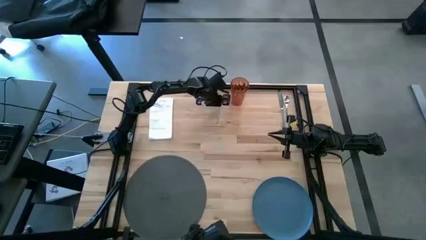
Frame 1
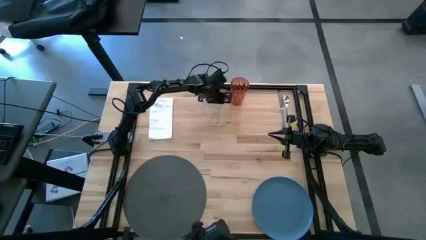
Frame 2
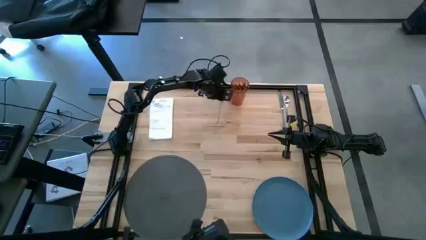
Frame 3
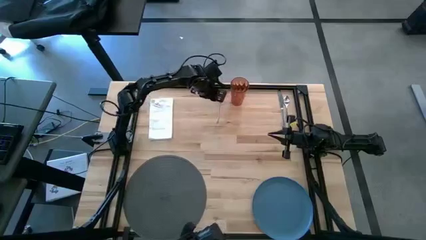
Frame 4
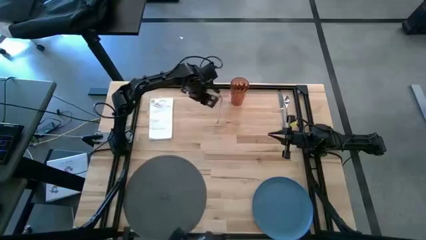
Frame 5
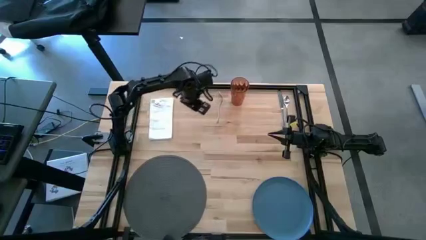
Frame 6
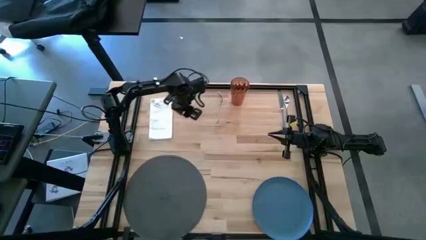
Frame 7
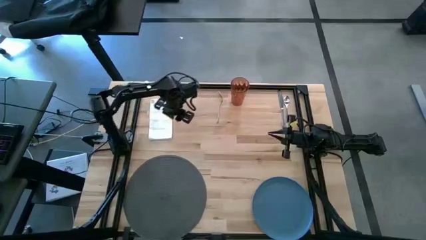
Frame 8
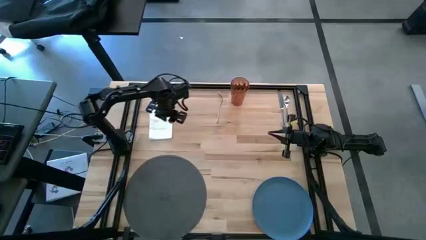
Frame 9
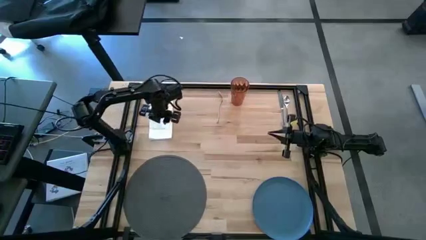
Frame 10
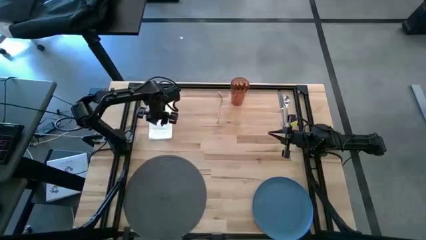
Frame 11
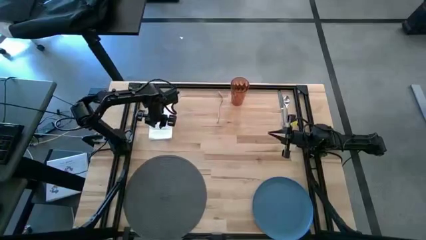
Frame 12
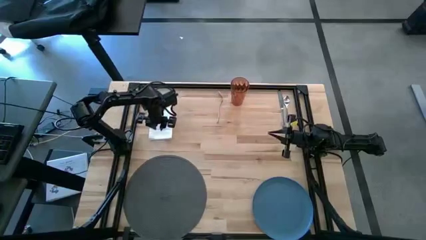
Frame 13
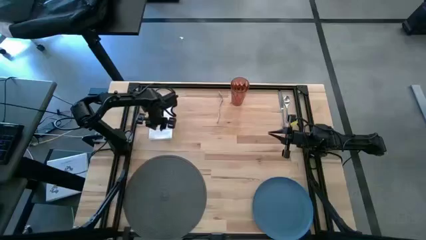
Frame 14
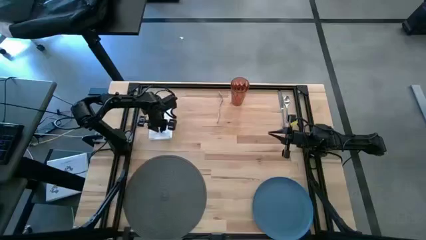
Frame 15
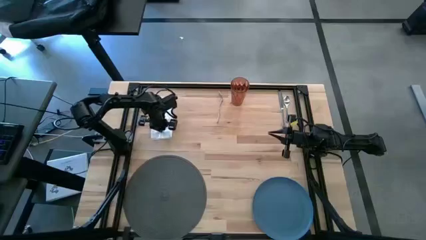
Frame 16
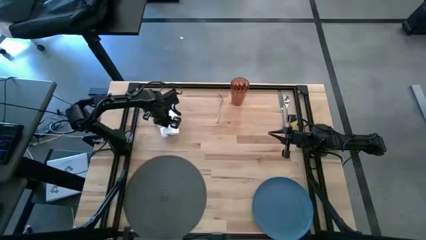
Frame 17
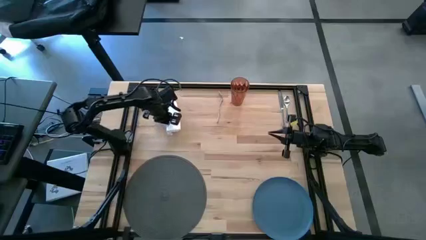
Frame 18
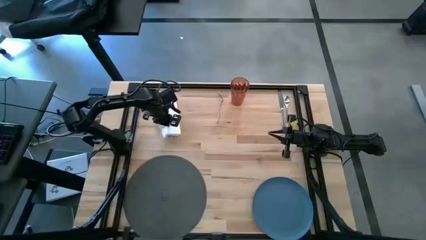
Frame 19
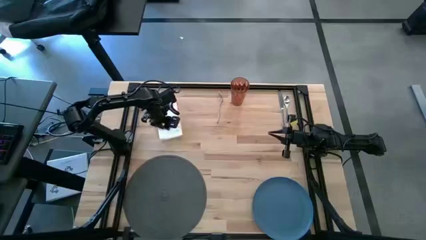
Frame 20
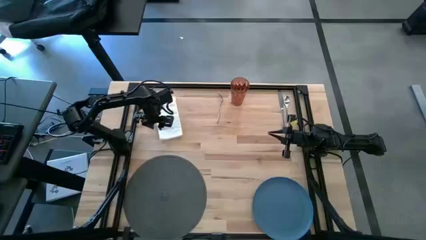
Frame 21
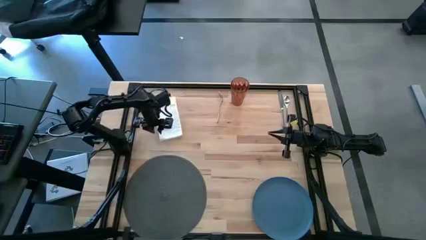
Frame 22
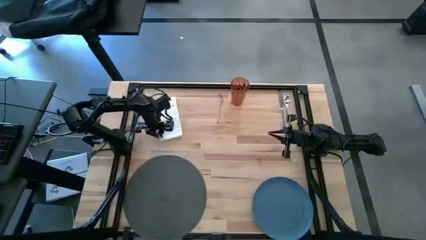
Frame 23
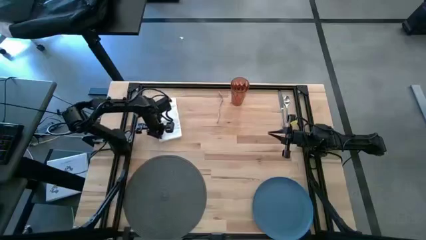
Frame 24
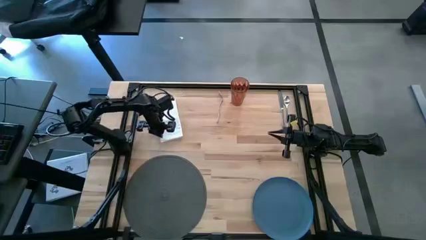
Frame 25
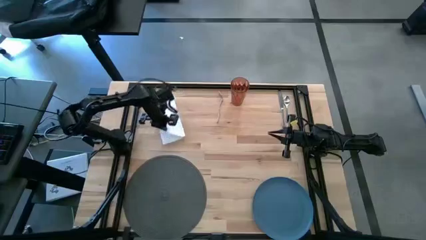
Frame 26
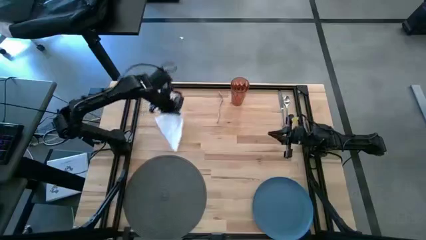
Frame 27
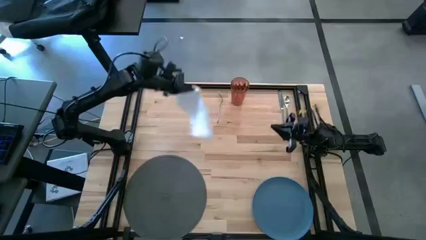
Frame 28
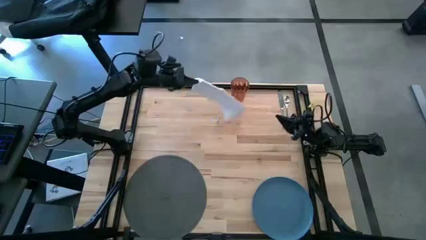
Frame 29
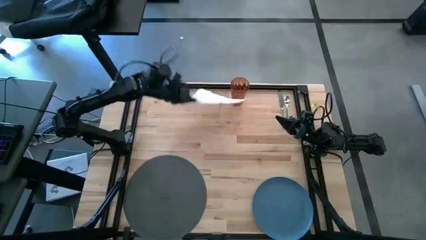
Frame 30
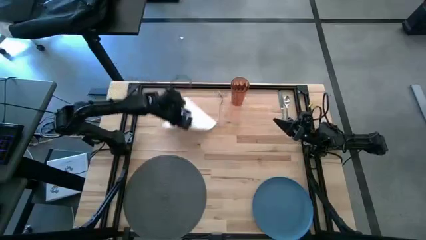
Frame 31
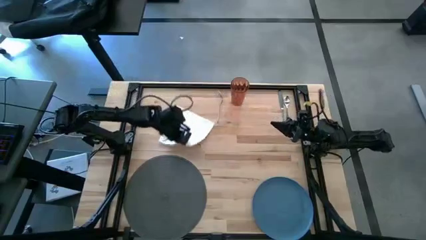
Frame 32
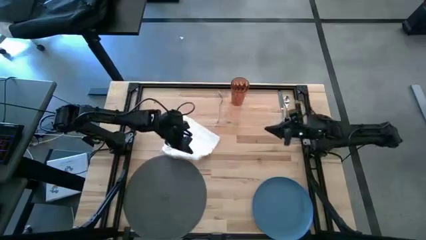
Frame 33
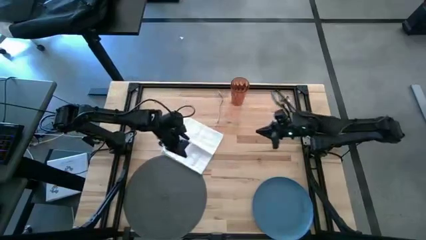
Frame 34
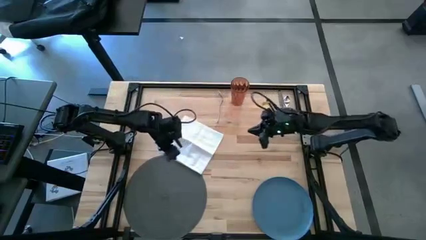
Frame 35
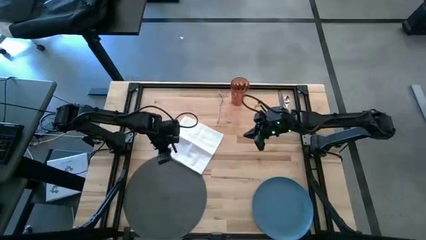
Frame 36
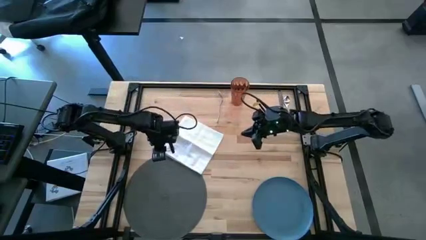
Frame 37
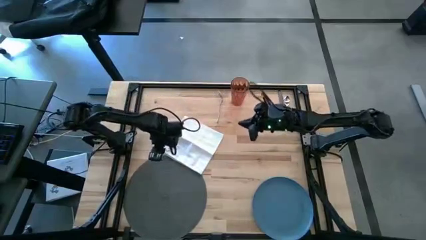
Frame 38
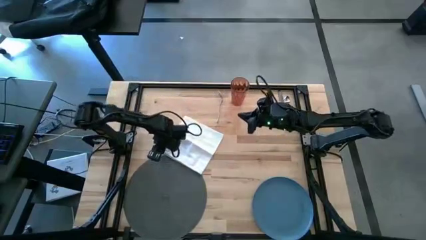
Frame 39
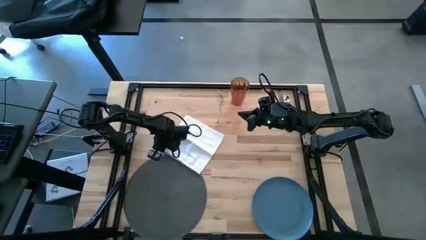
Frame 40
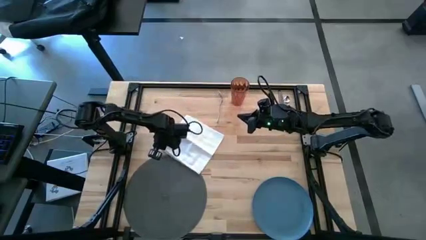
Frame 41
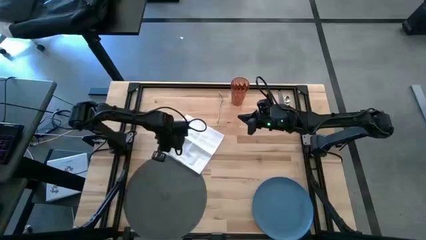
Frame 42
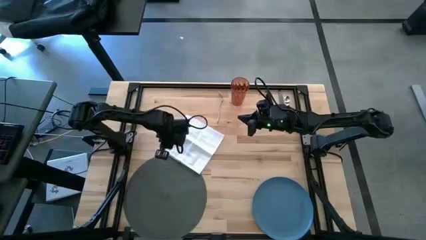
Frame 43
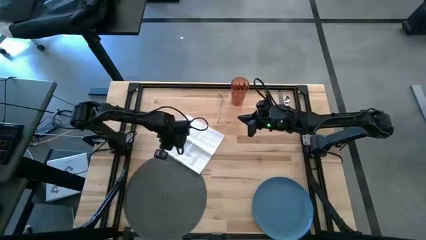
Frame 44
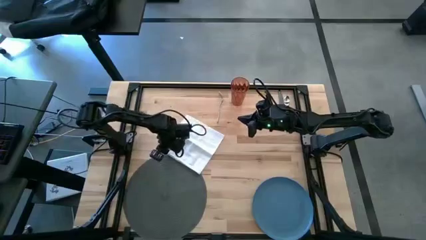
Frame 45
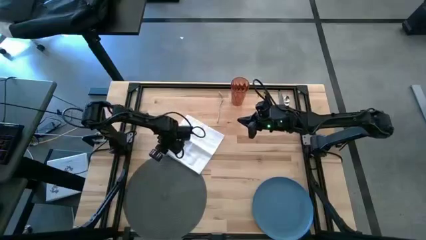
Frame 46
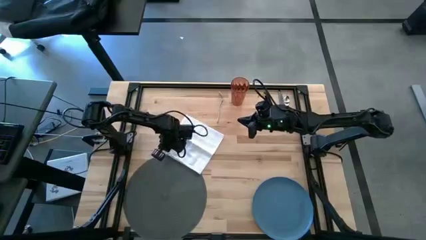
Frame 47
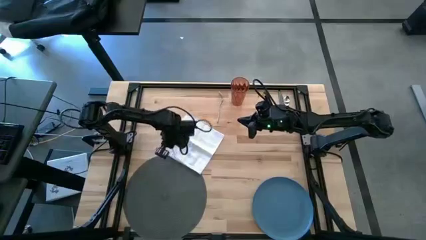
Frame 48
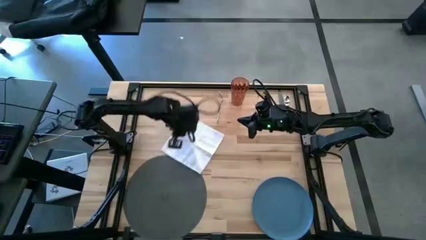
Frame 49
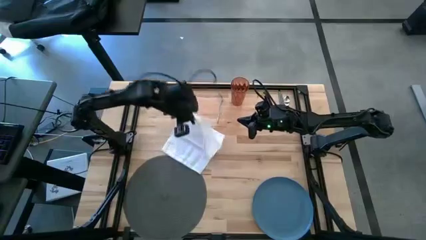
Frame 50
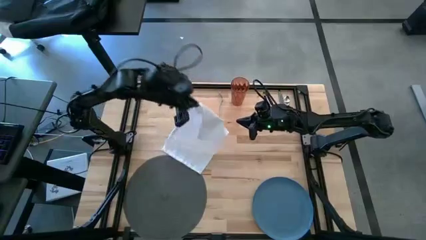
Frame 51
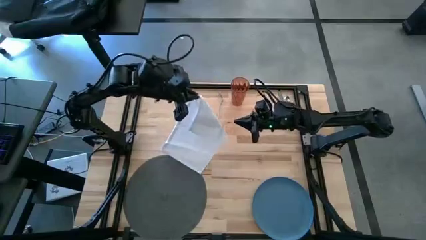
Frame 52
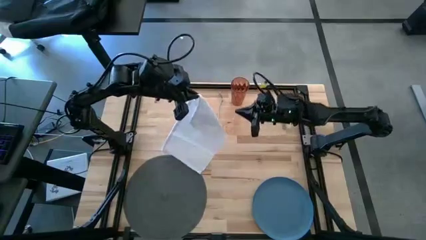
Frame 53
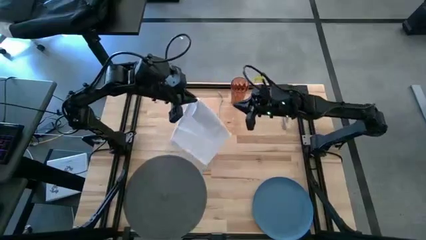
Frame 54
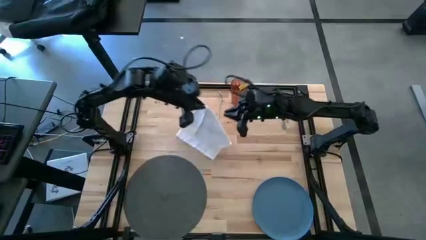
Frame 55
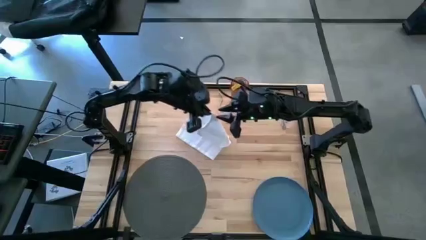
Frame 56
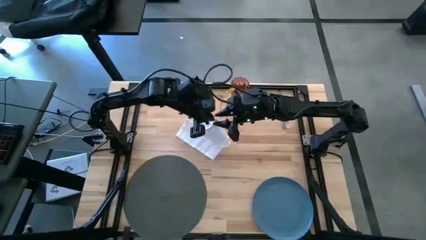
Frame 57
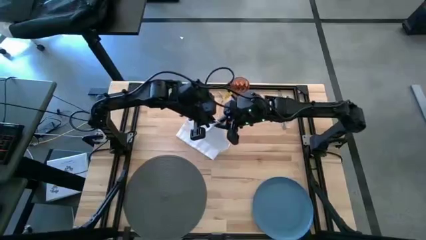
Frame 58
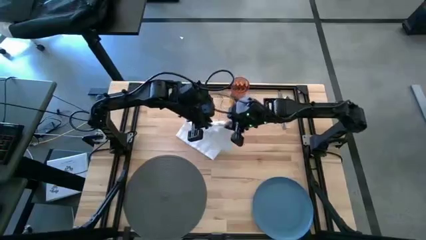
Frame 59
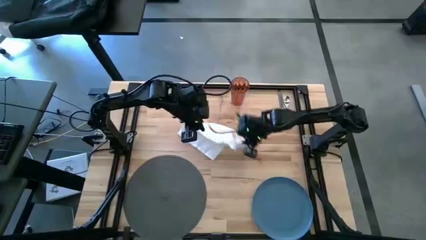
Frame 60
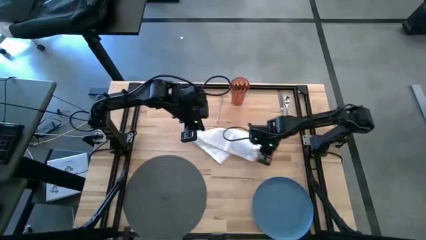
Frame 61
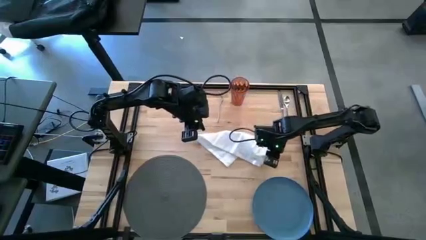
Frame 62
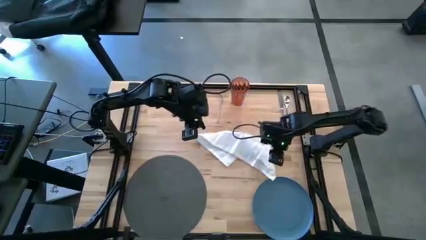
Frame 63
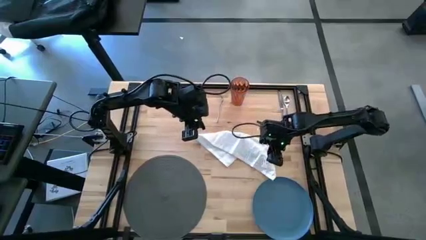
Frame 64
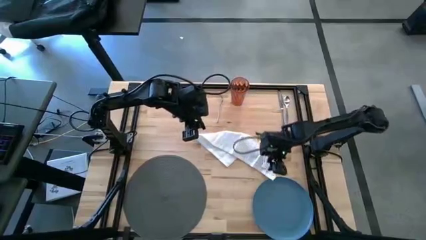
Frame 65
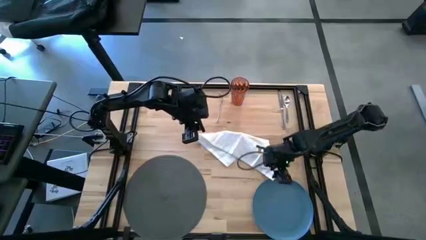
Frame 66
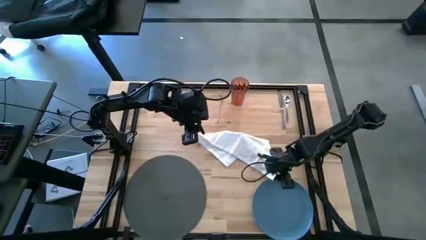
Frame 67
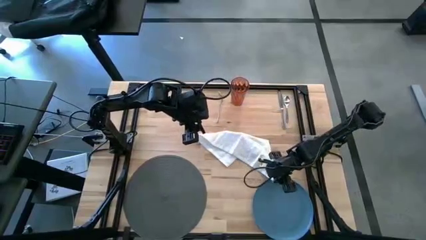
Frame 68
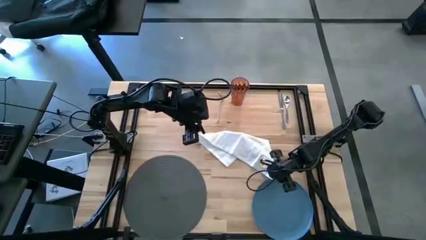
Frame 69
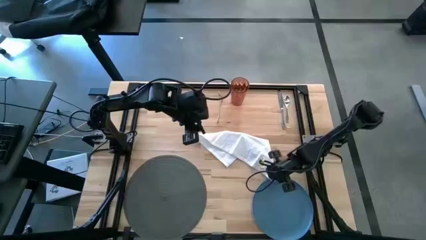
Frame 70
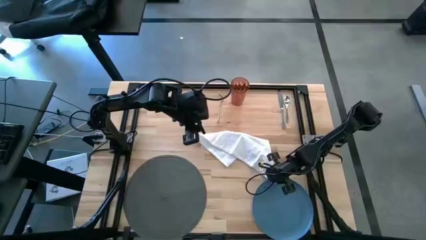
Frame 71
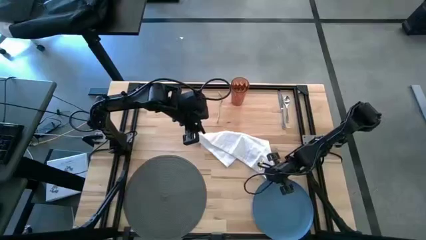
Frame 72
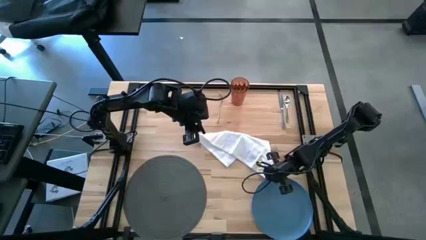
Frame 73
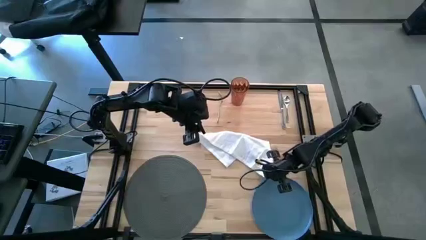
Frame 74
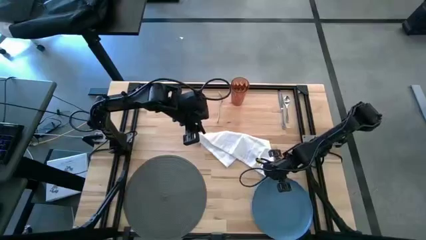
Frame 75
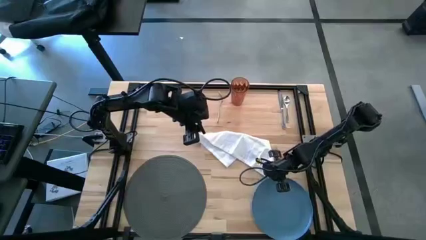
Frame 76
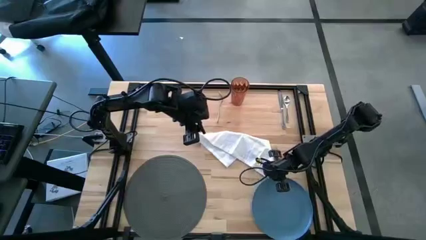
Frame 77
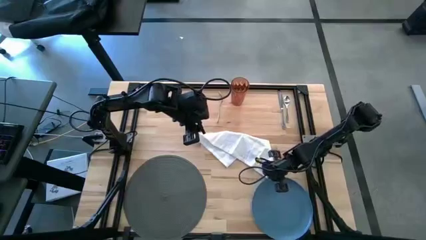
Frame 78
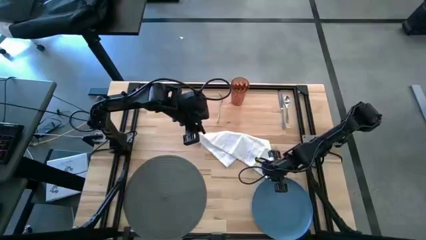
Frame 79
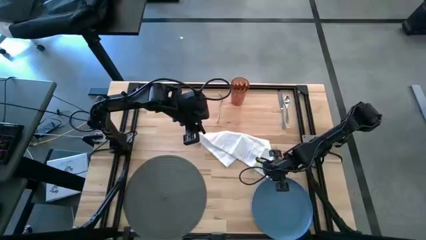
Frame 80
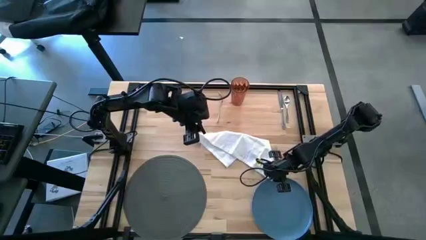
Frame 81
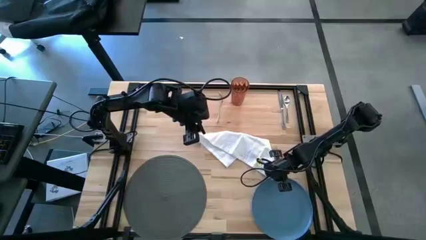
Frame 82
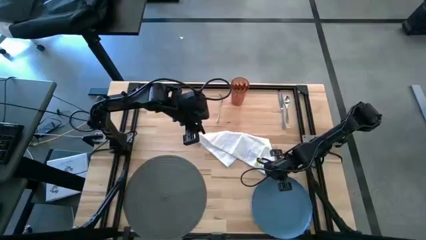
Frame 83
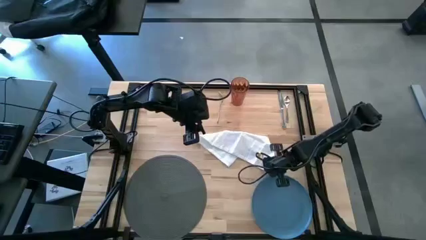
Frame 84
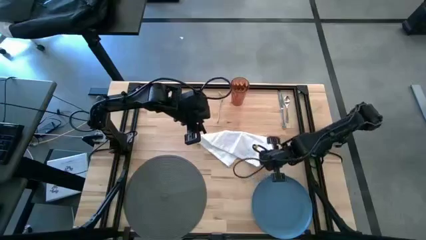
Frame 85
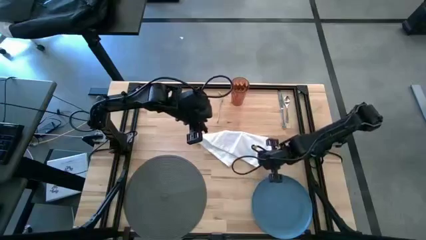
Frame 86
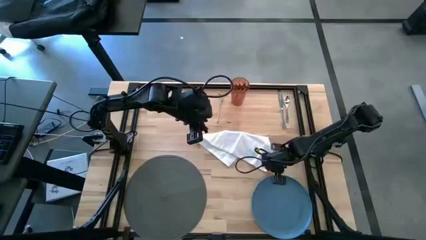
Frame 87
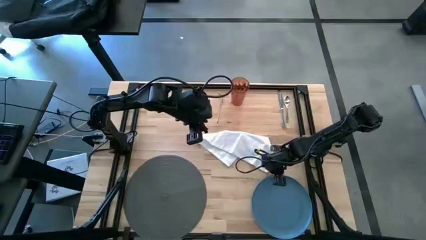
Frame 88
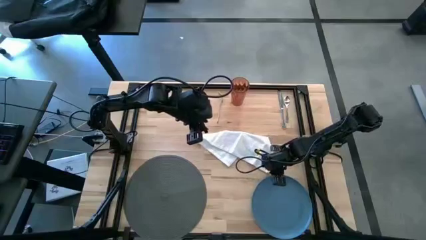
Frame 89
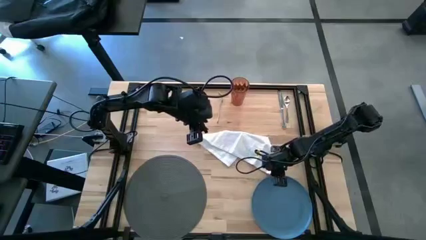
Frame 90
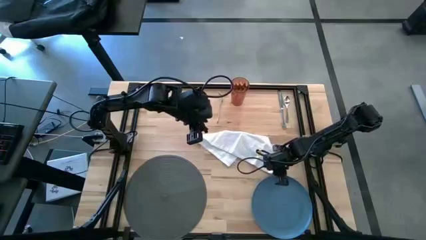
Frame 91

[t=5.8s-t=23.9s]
Task: Set table place
Fold the white napkin
